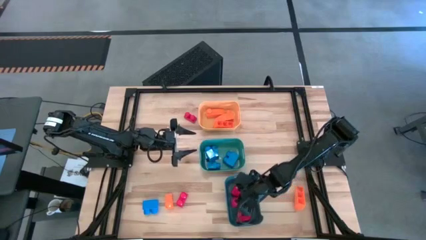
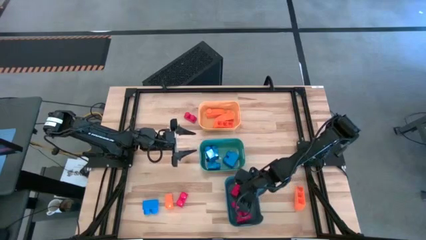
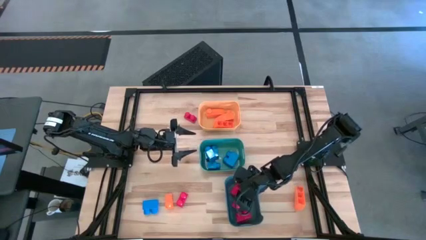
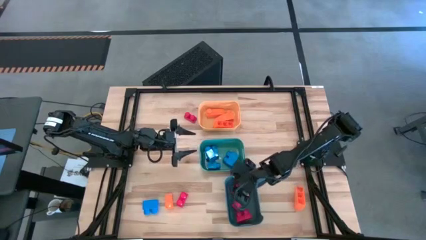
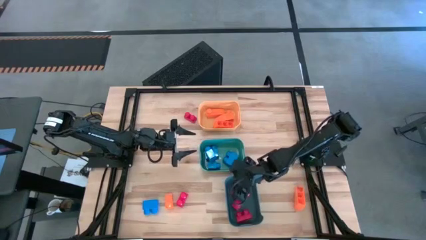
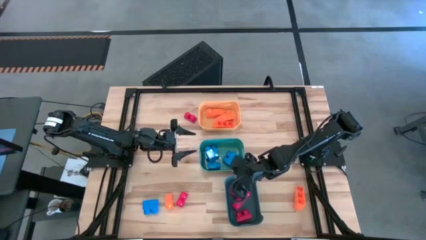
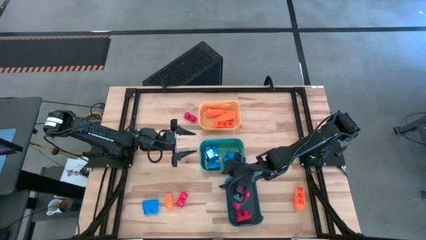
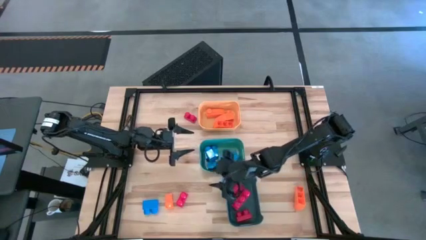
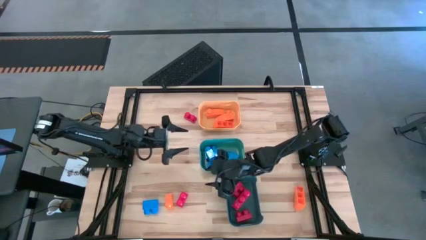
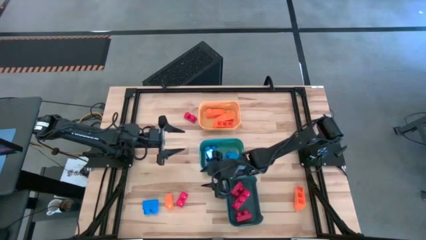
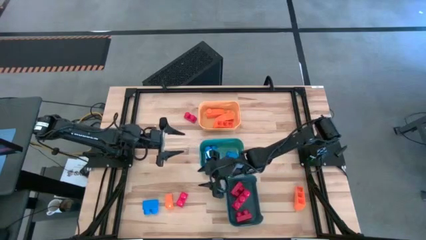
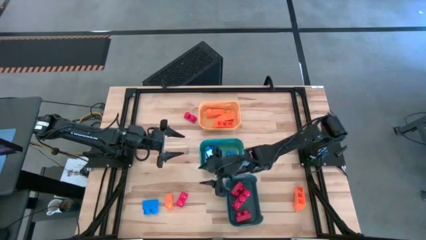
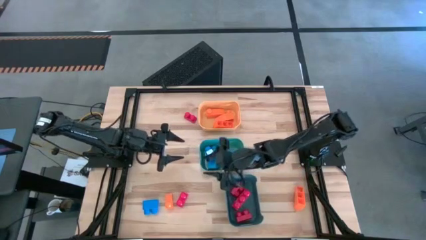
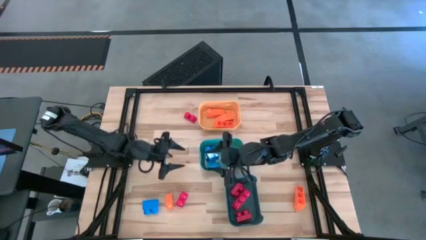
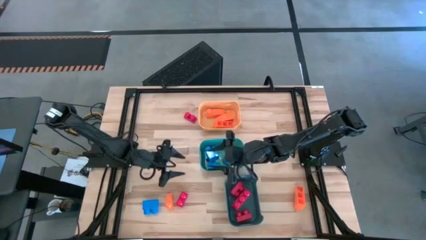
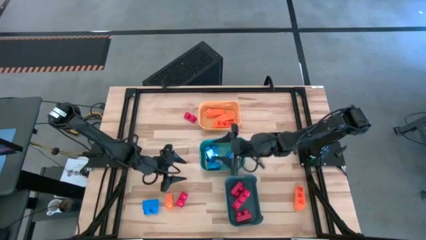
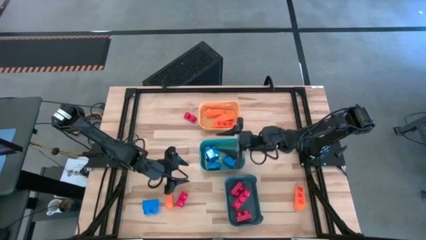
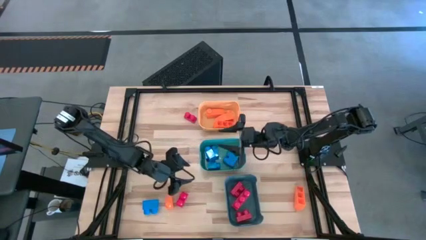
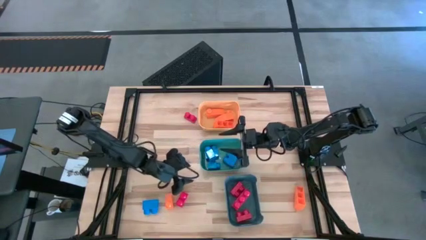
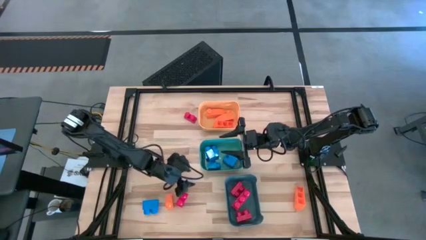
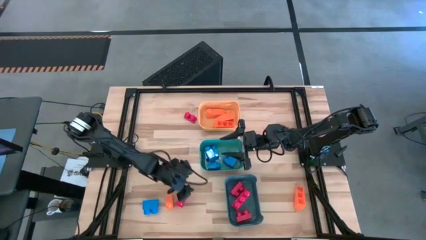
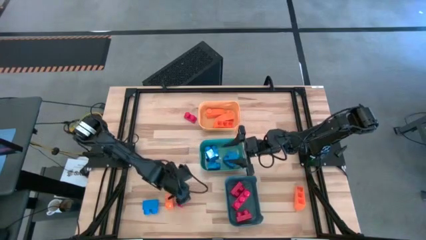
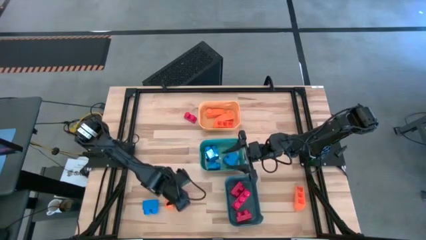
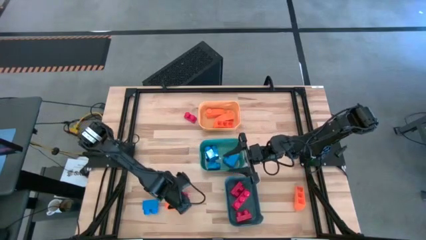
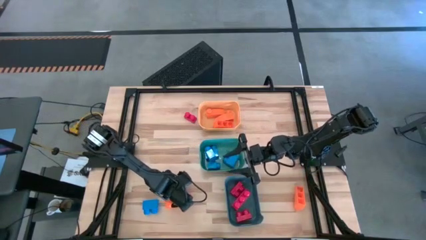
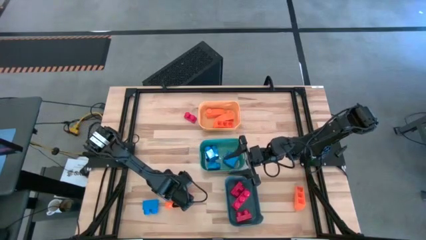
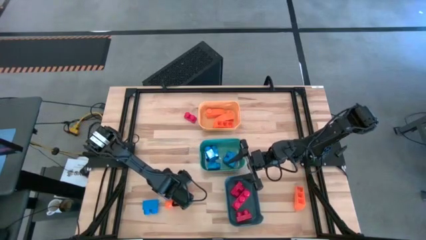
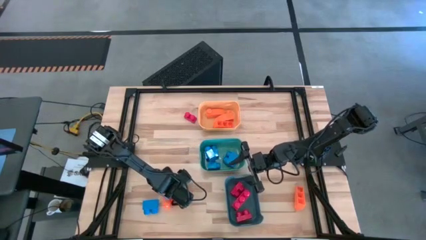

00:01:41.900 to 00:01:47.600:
Task: Sort & place blocks by color
Put the red game piece into the blue bin

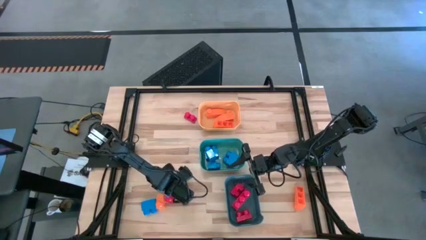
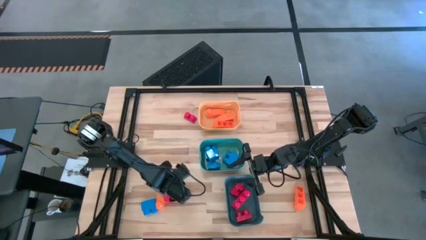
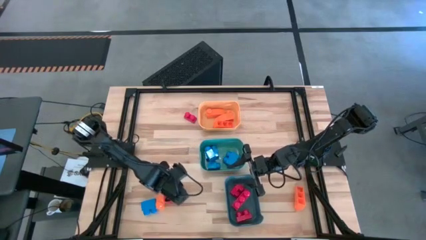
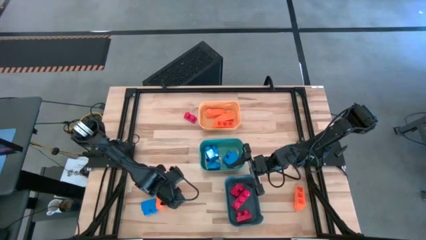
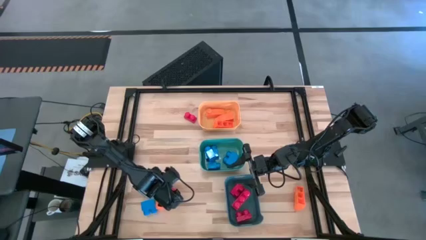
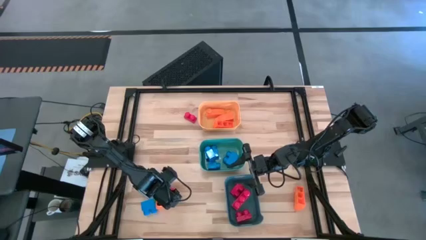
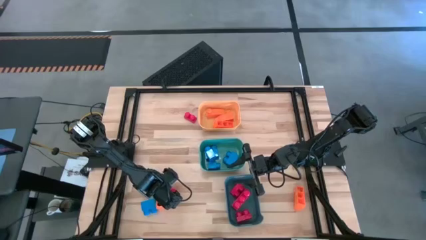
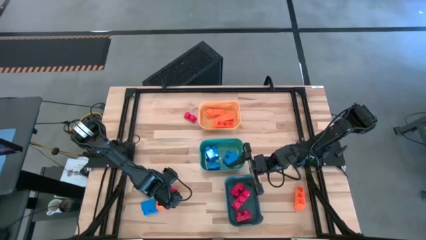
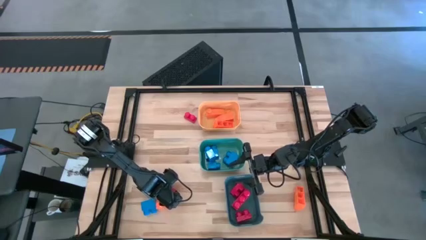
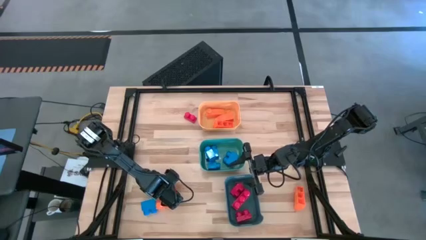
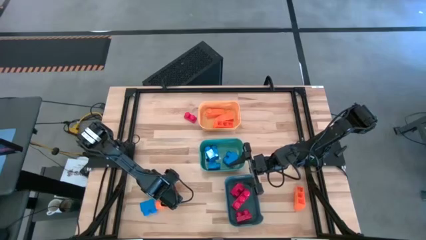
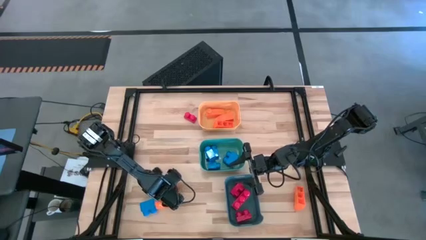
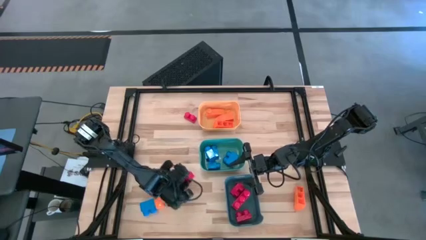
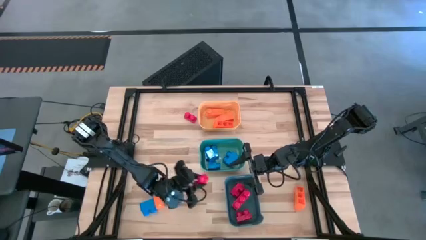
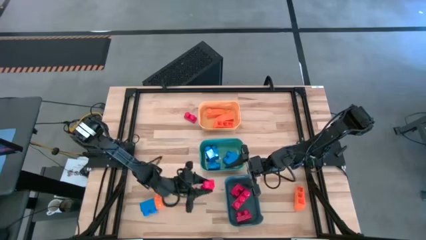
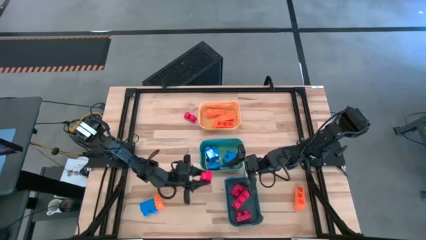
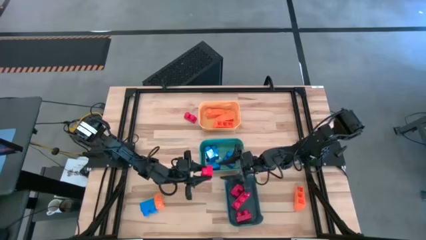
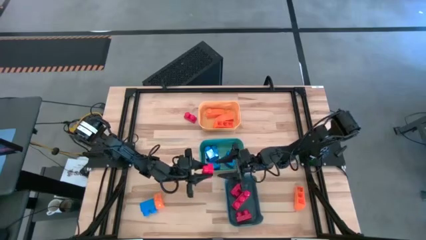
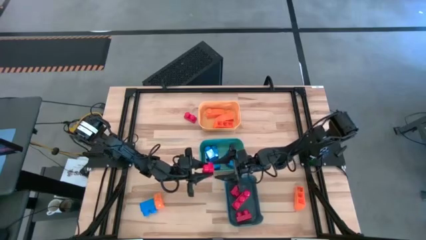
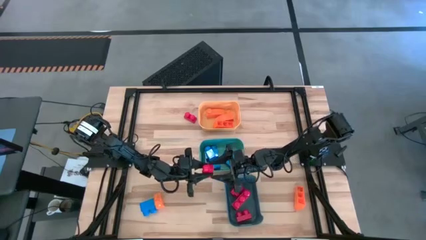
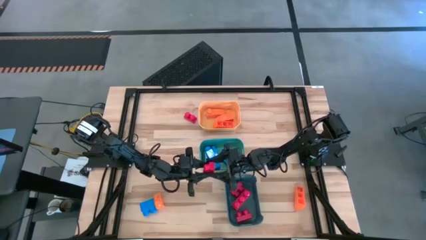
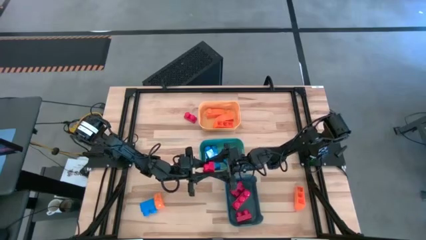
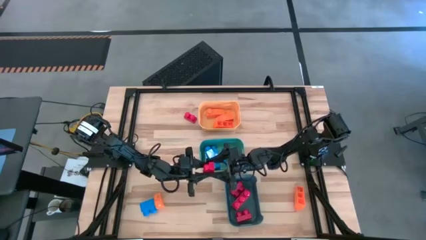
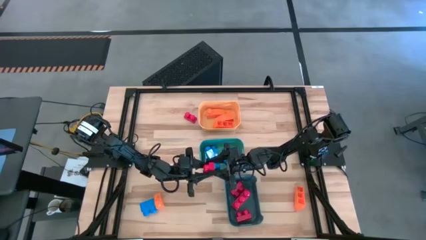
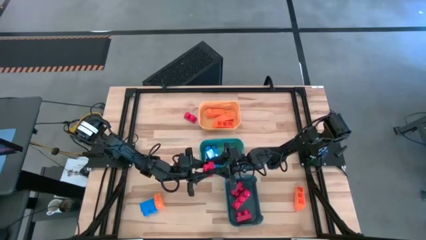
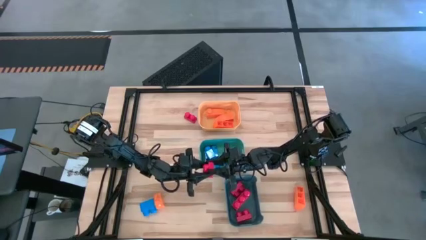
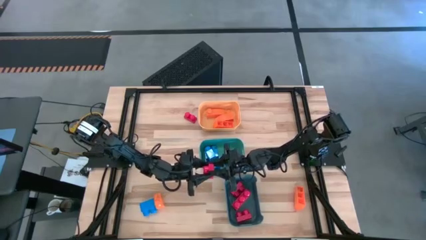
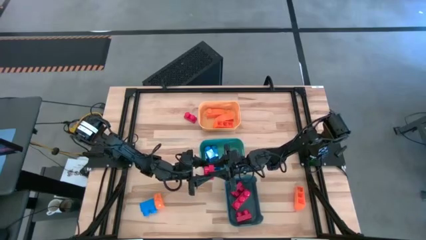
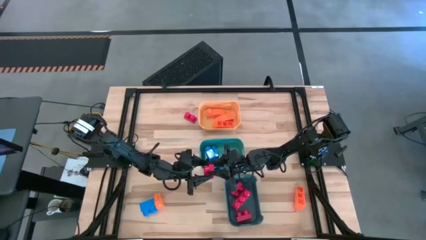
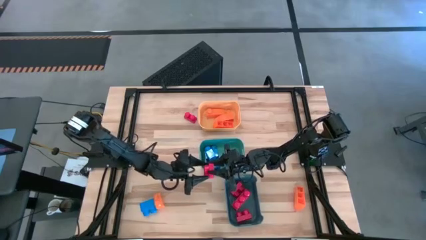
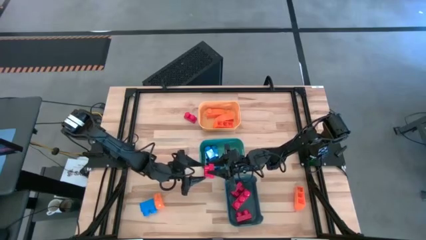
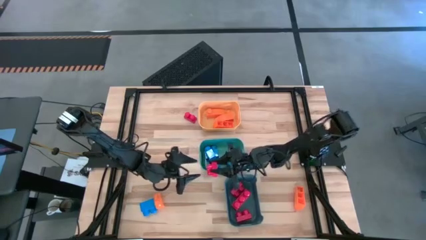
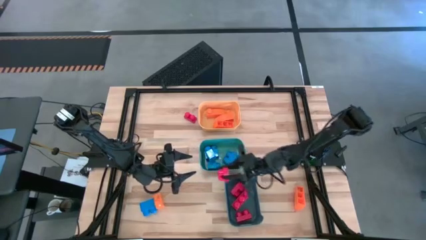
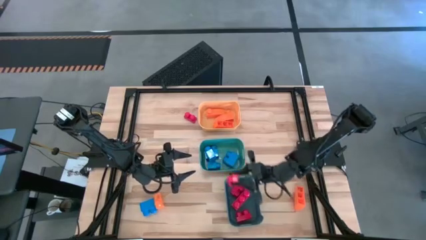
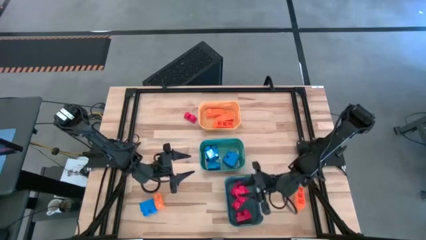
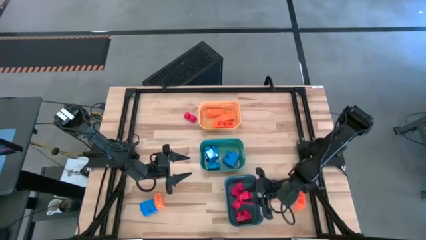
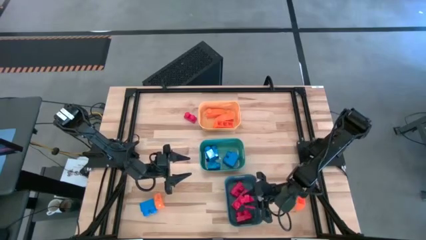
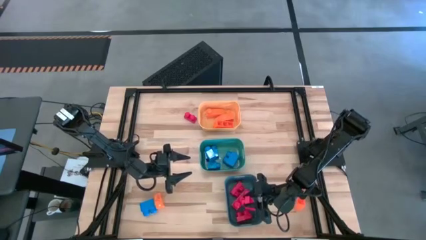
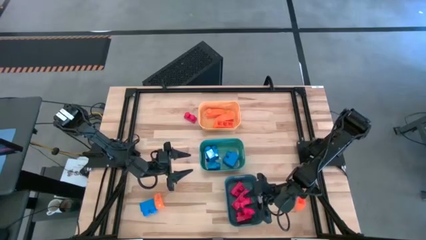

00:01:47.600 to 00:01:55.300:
Put the red game piece into the blue bin
